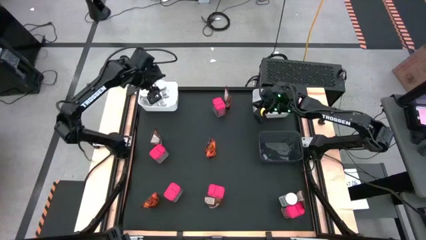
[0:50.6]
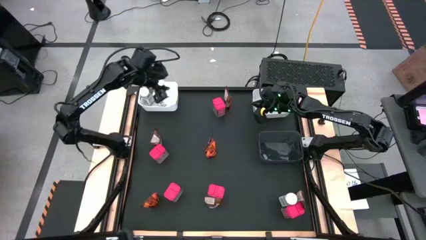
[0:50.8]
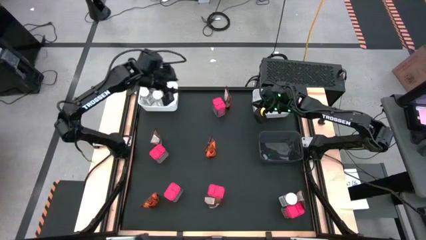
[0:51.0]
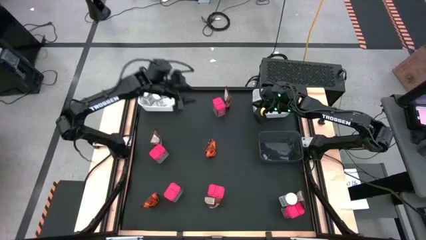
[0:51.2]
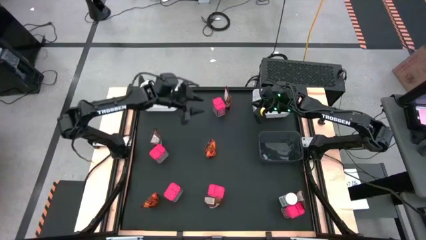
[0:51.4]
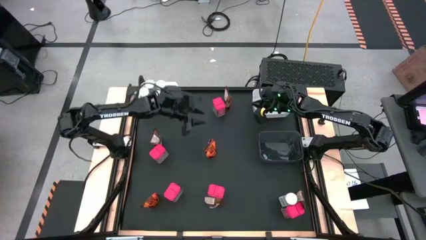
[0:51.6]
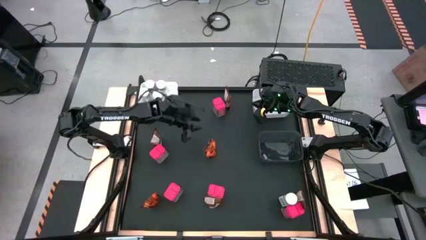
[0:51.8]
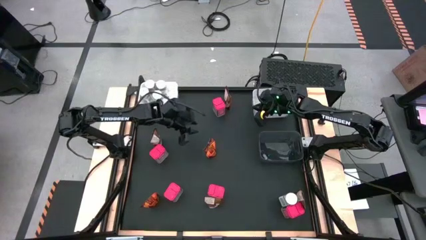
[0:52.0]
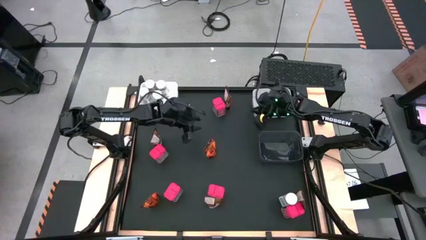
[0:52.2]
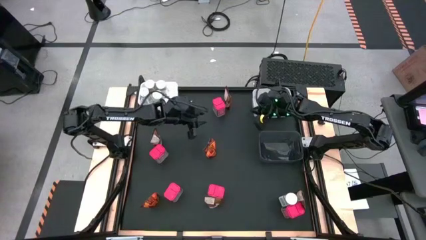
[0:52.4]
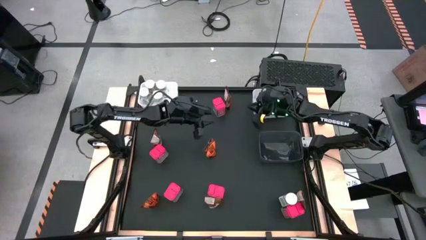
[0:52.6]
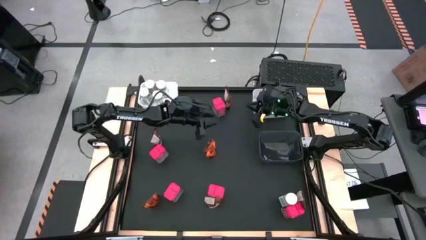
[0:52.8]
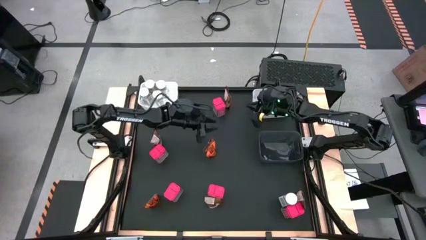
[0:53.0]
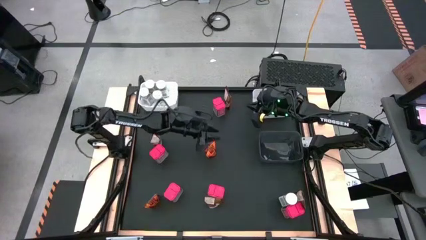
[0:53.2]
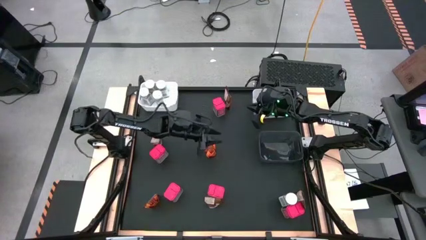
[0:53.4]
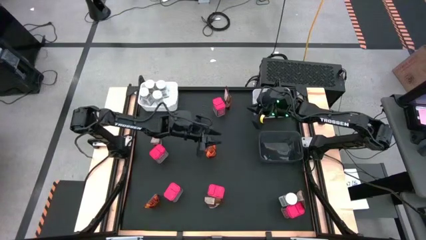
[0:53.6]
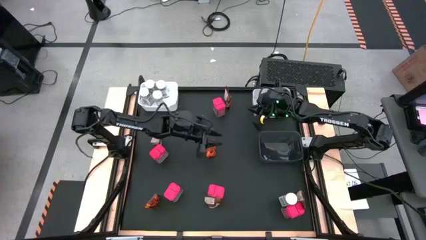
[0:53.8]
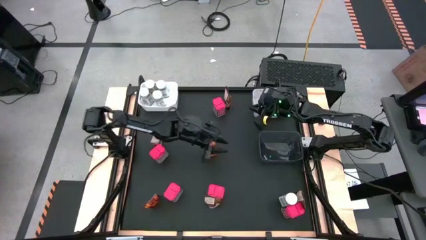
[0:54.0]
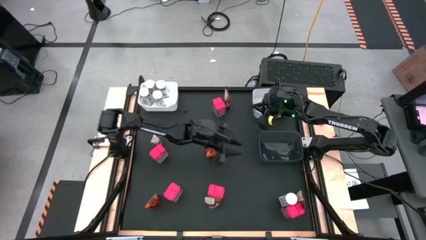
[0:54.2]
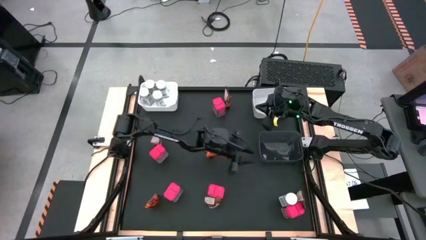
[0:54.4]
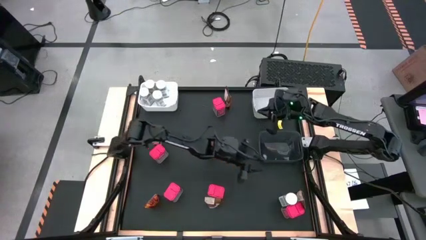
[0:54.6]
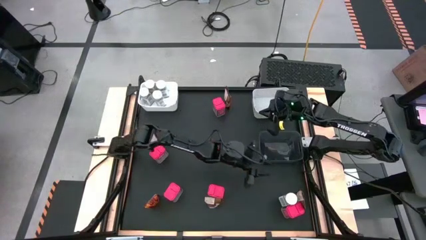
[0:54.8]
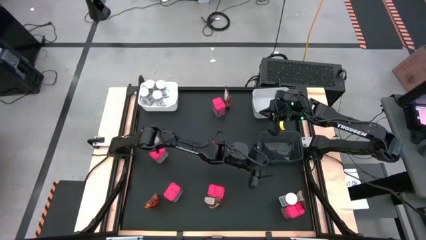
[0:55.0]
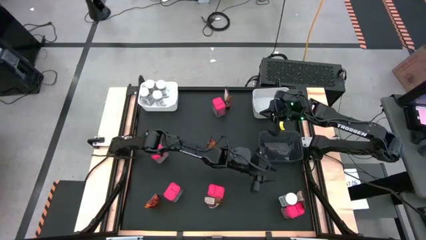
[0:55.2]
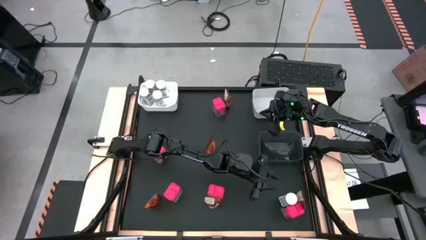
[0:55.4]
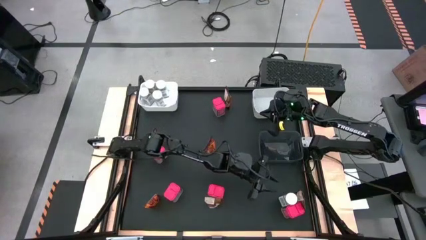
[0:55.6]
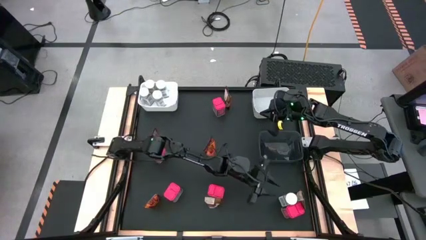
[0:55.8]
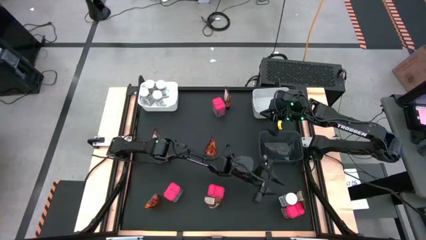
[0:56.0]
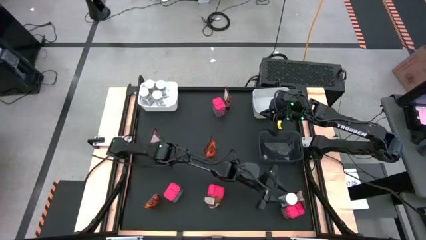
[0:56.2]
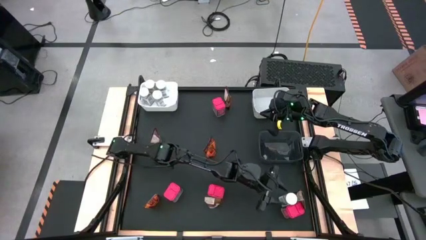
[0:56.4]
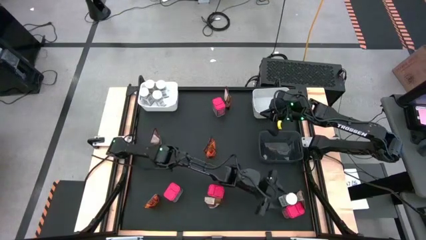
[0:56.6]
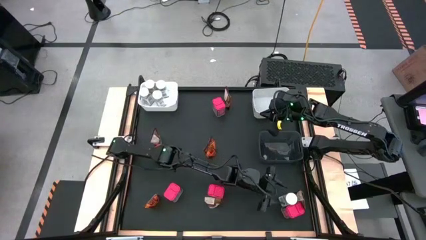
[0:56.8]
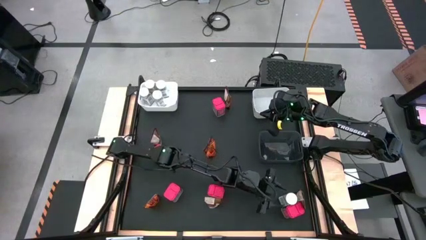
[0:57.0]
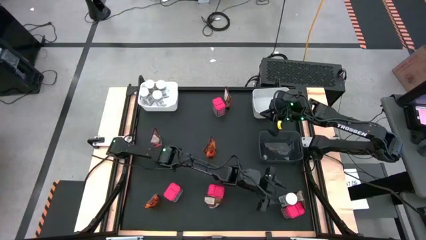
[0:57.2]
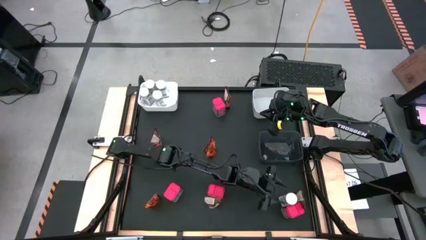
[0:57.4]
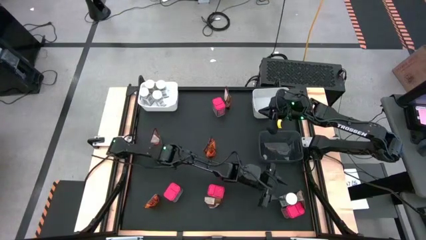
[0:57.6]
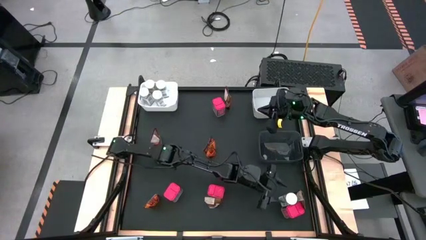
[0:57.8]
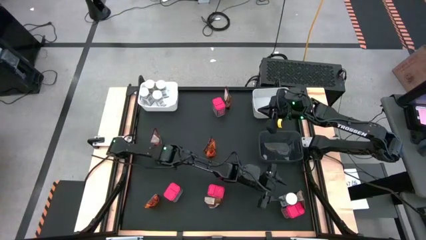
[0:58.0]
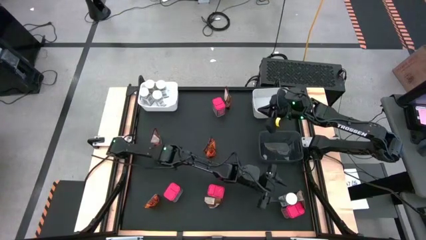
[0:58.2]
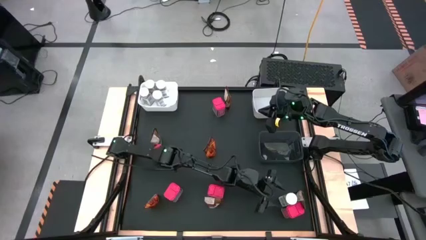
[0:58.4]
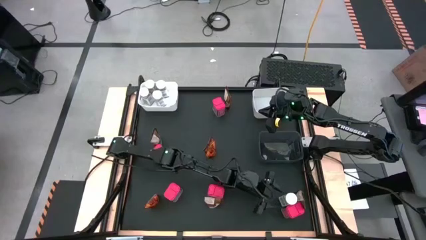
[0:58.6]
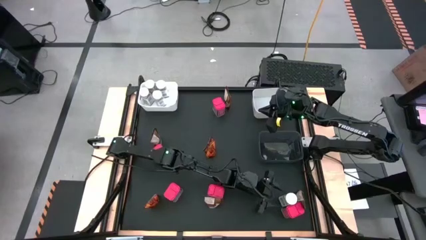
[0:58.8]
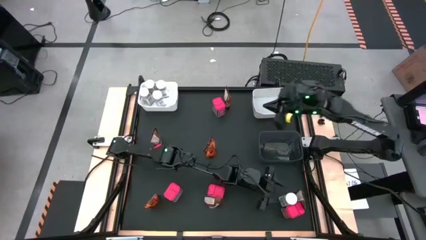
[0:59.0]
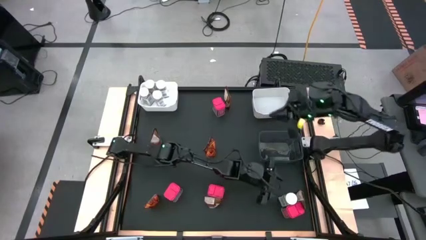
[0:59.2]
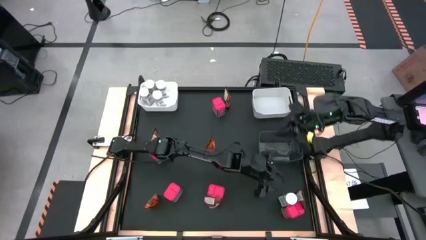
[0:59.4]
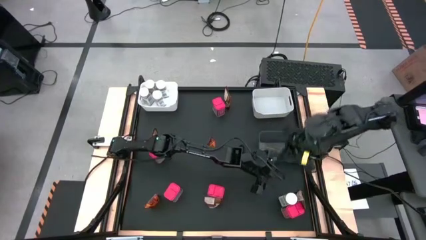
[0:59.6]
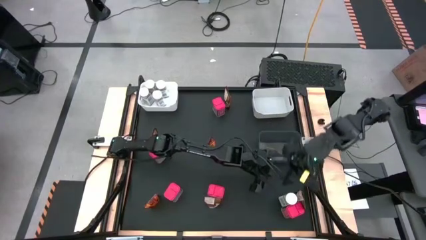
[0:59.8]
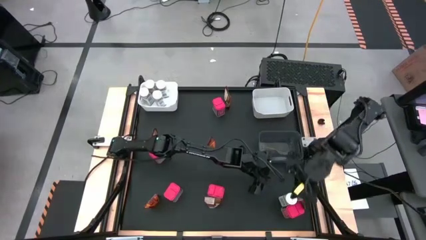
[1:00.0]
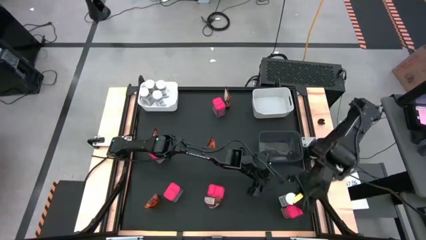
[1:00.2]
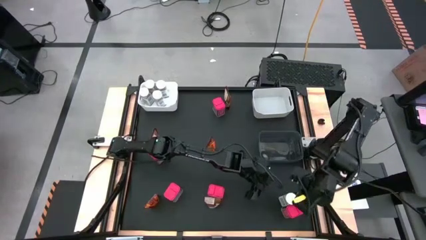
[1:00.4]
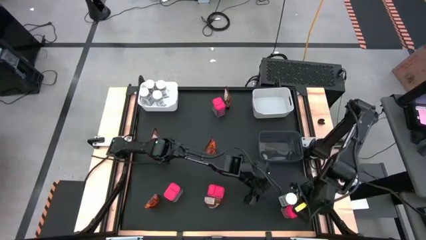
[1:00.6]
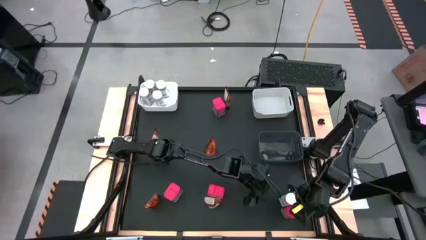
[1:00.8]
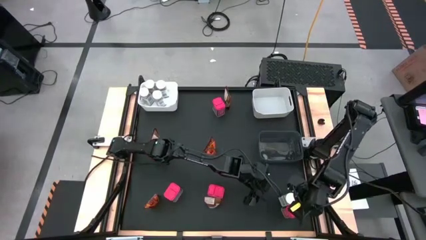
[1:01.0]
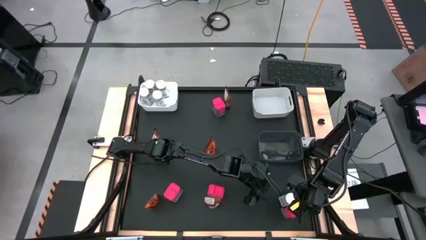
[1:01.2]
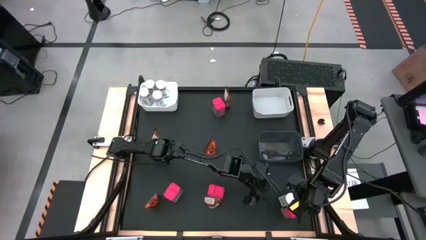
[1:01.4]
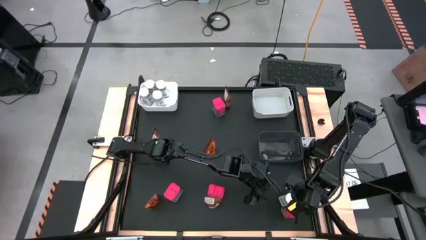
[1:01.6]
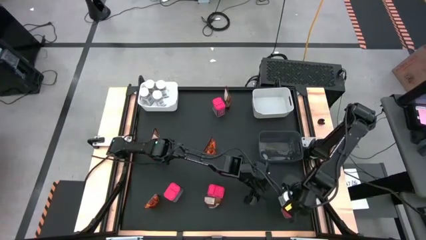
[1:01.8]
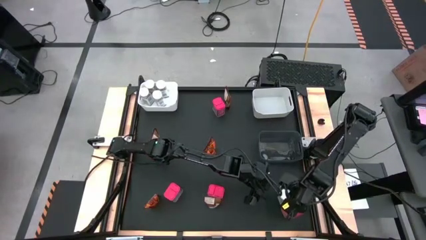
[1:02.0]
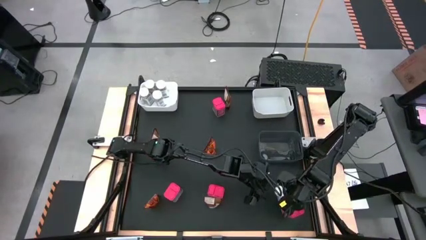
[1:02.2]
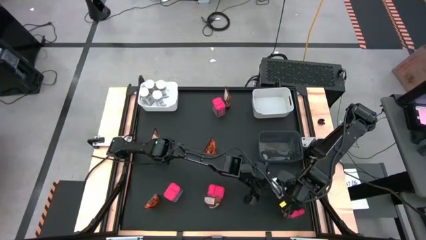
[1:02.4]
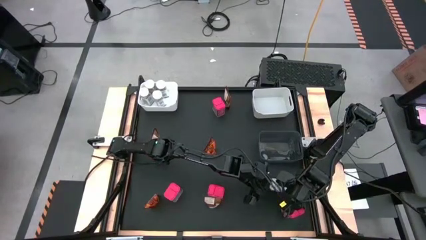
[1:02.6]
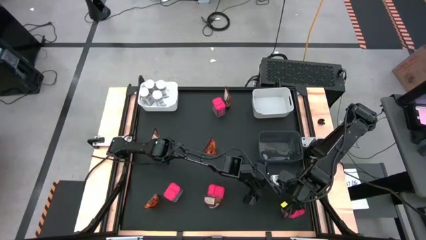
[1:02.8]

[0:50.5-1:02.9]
Task: Sort spices by type
Put the white seasoning bottle into the left white bin
